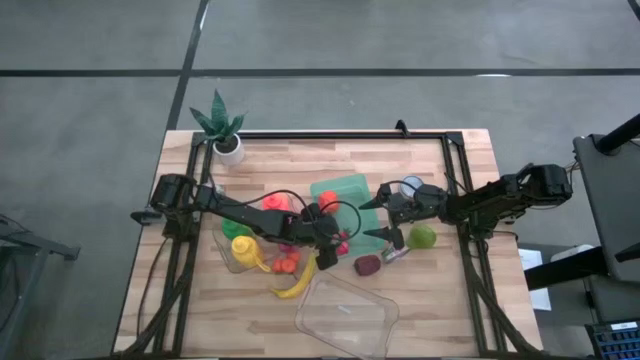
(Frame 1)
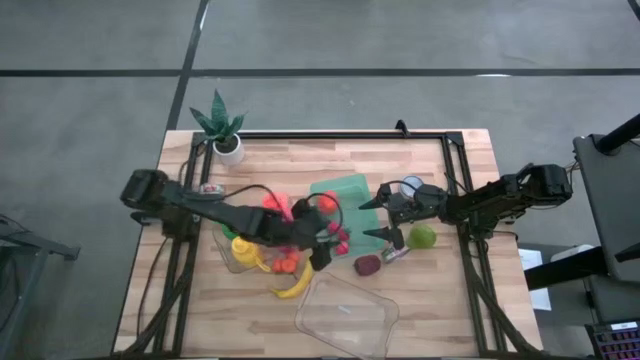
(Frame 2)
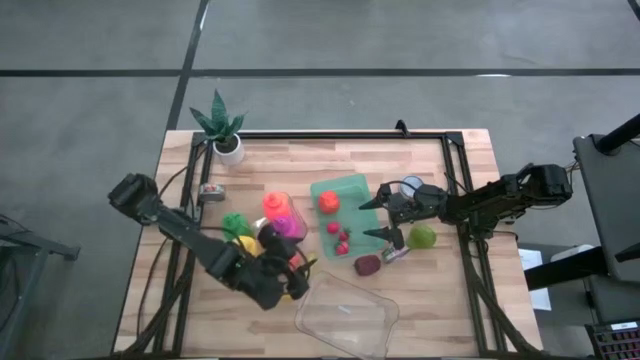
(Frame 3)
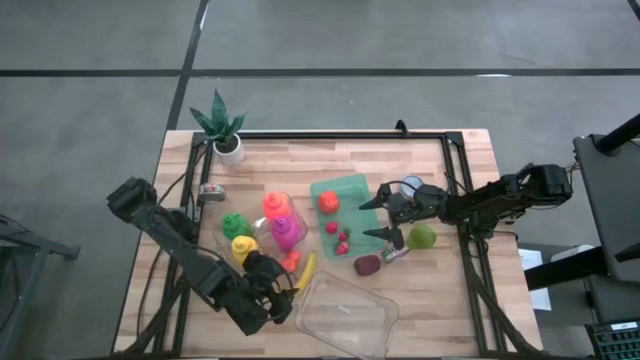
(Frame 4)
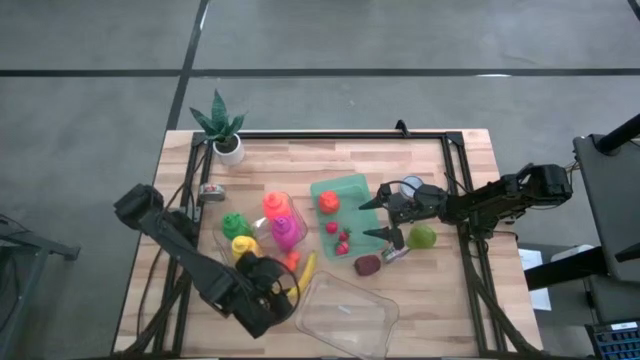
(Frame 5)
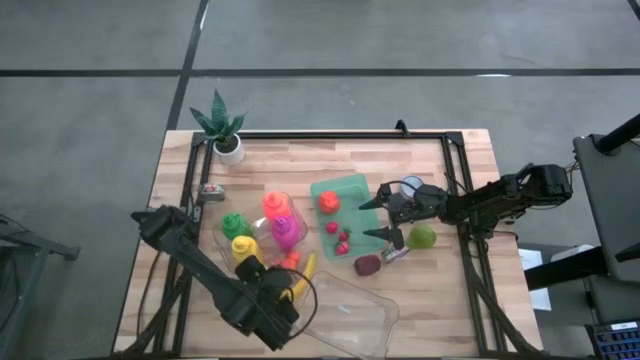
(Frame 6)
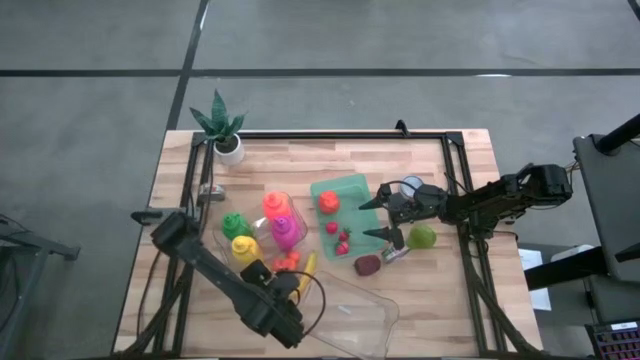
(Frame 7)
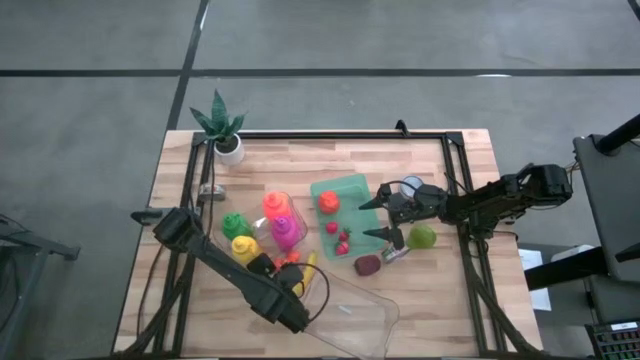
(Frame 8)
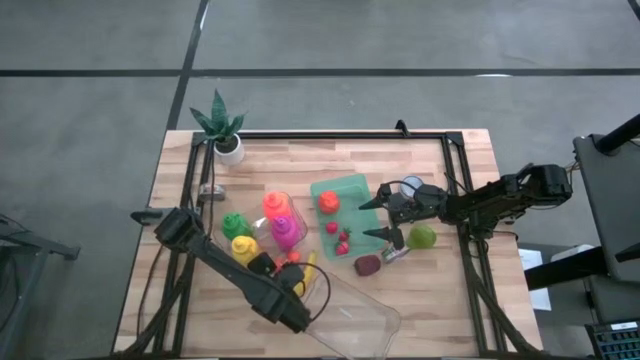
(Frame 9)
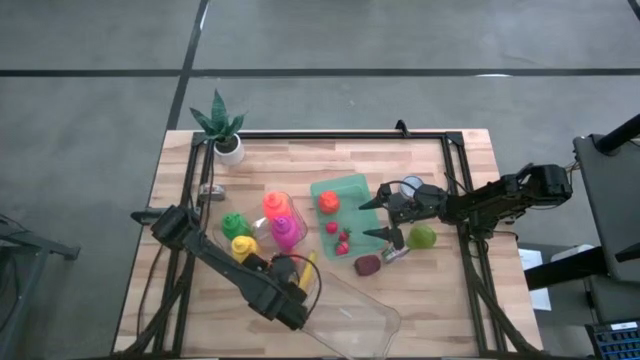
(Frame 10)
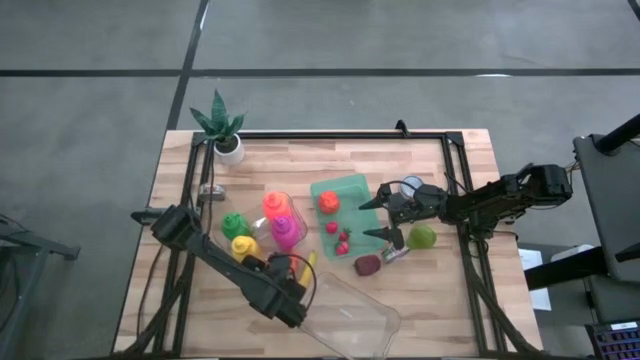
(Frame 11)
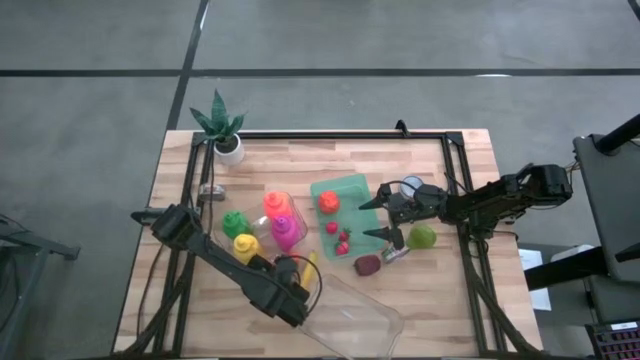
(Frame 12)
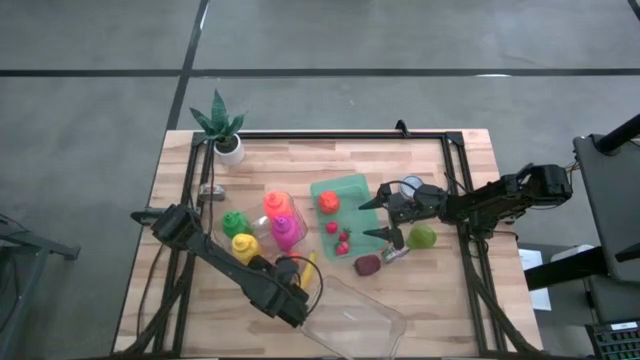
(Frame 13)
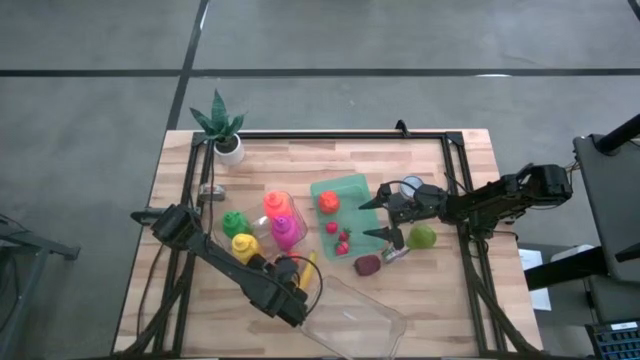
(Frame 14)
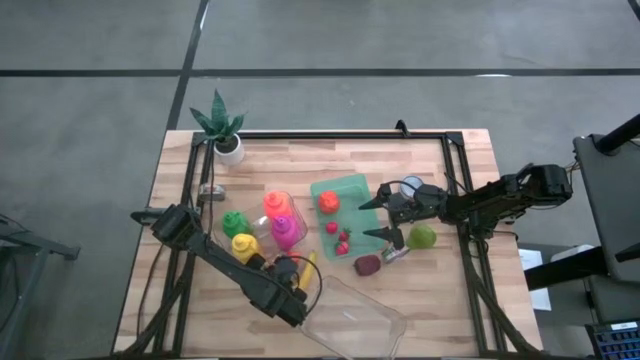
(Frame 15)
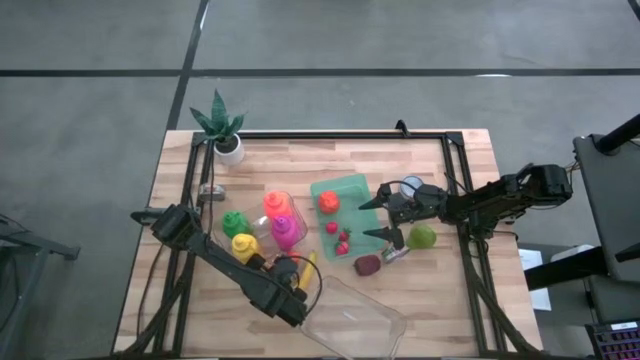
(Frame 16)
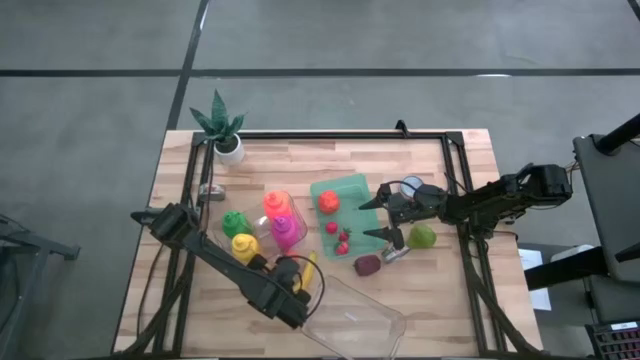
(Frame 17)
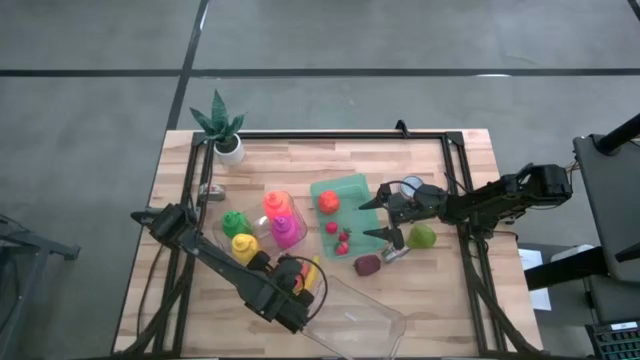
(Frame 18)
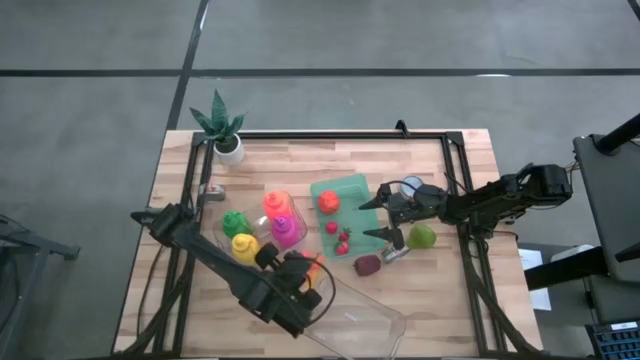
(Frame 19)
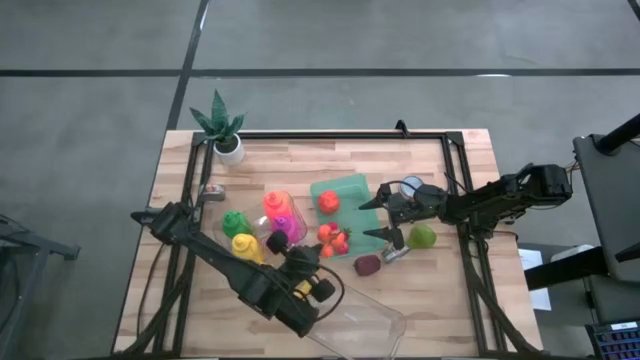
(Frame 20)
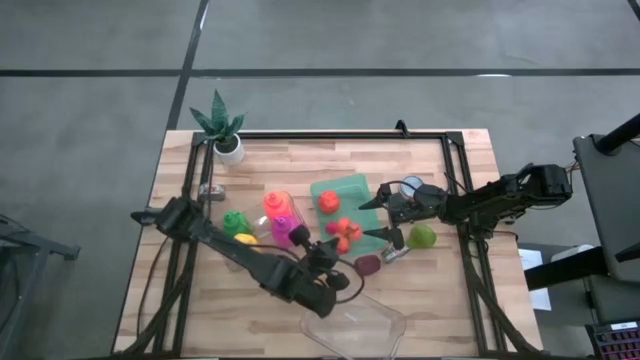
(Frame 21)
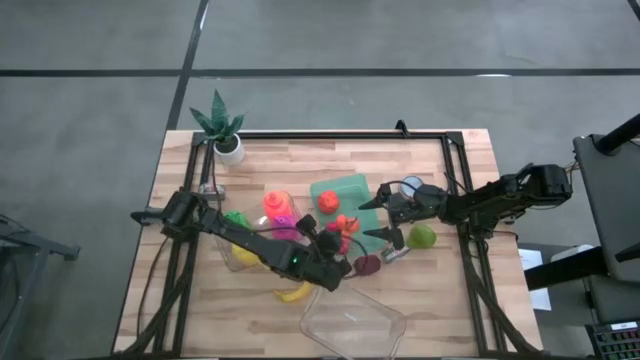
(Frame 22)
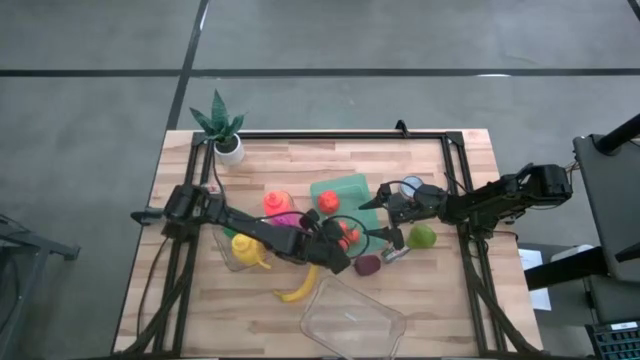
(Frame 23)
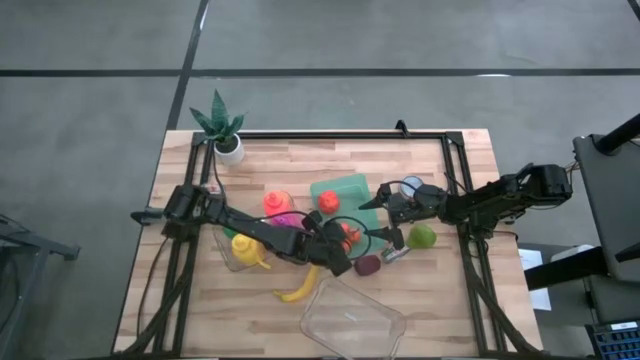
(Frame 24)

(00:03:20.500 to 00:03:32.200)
Task: Pick & Place Food Item
Put the oranges into the green bin

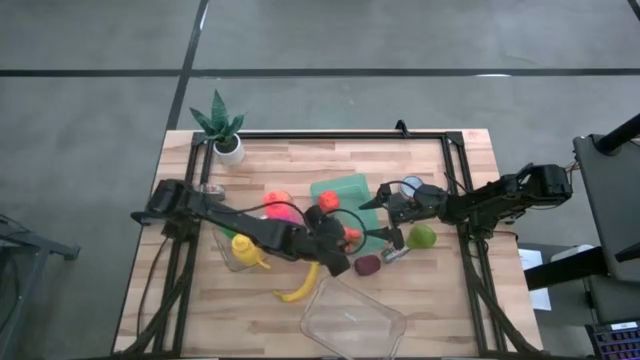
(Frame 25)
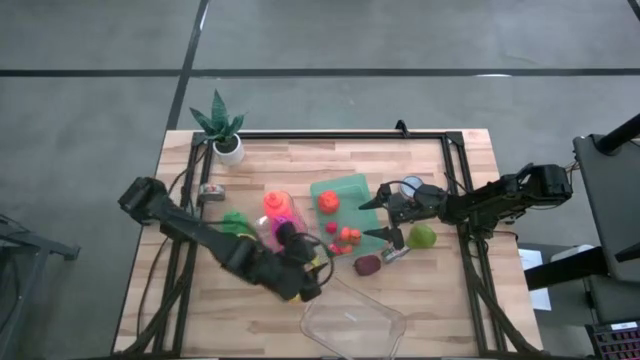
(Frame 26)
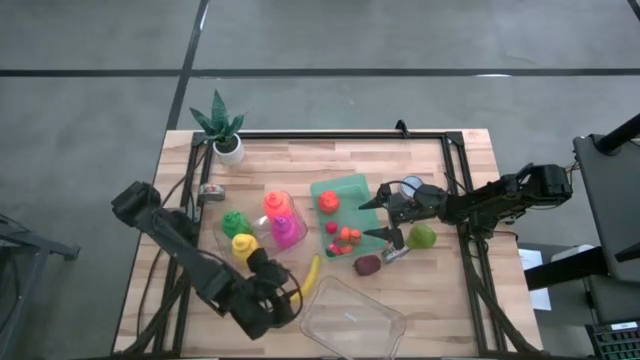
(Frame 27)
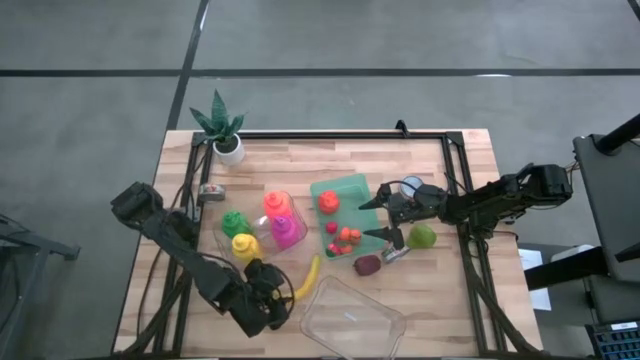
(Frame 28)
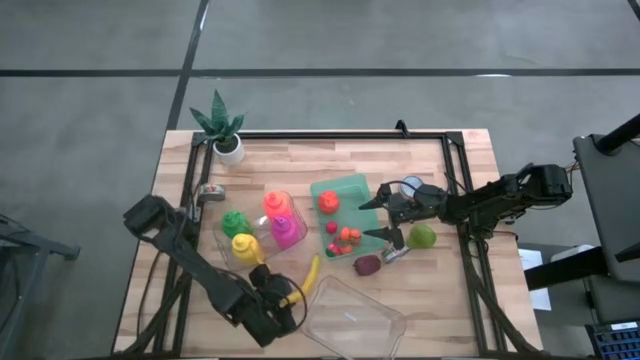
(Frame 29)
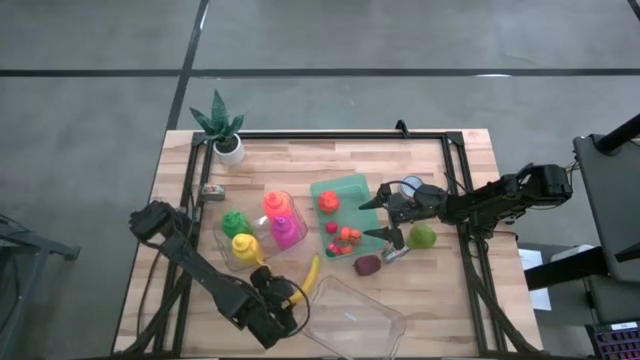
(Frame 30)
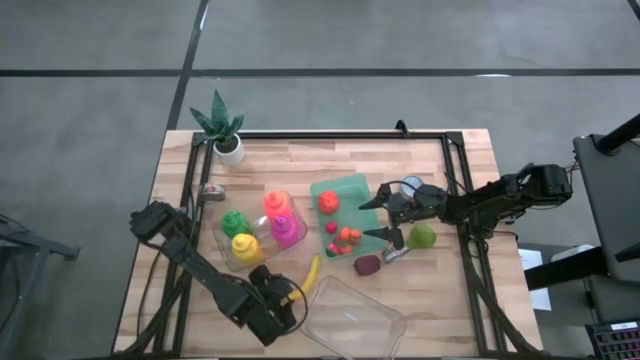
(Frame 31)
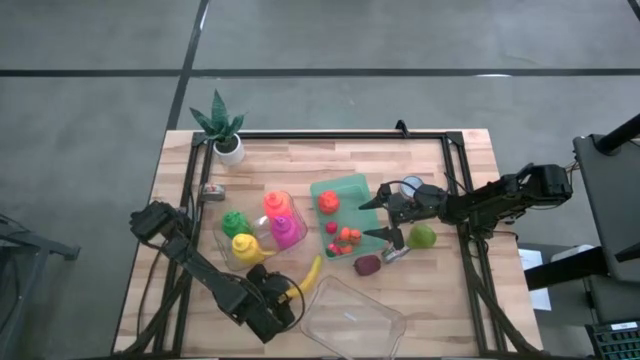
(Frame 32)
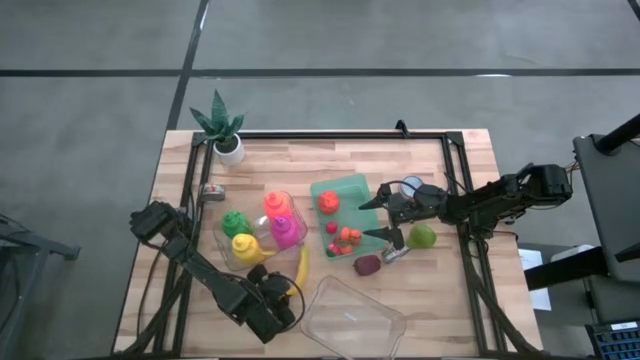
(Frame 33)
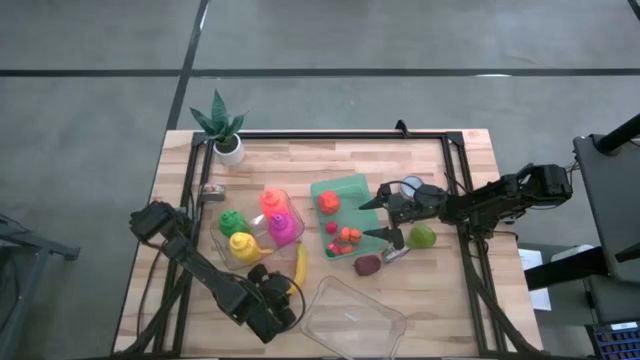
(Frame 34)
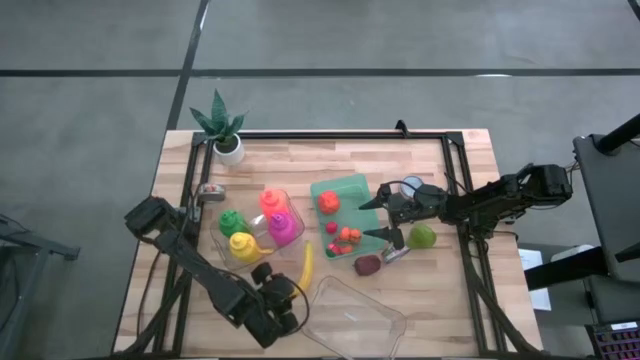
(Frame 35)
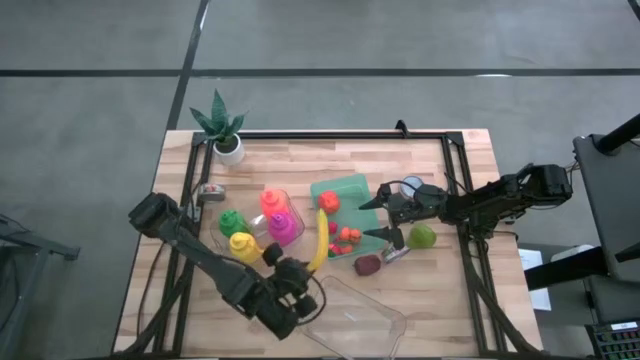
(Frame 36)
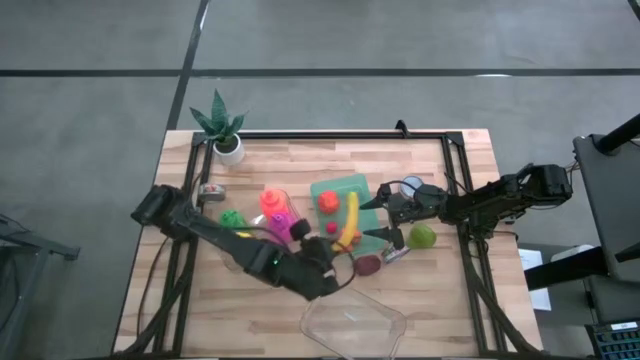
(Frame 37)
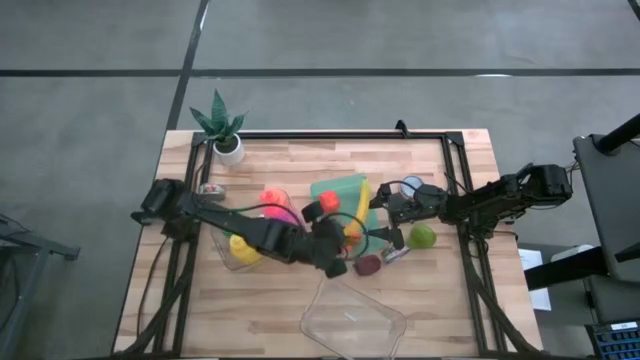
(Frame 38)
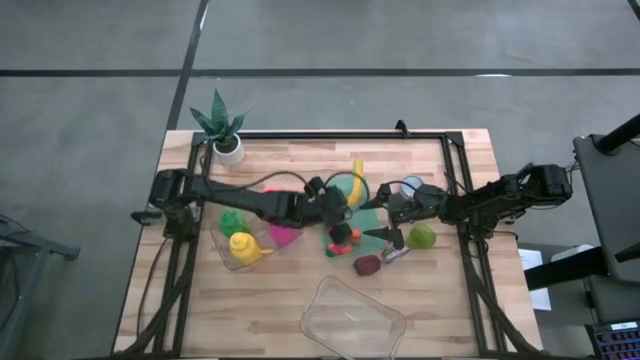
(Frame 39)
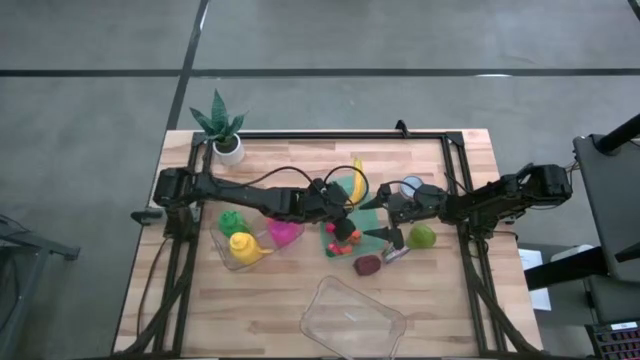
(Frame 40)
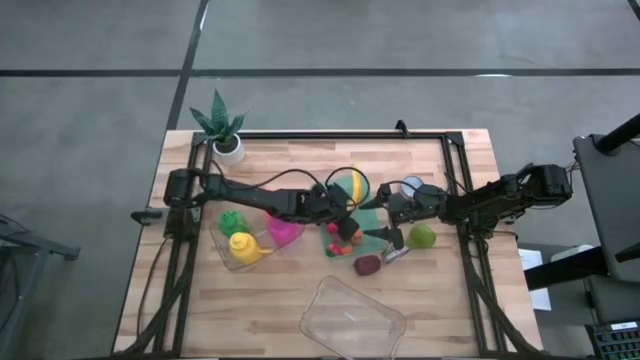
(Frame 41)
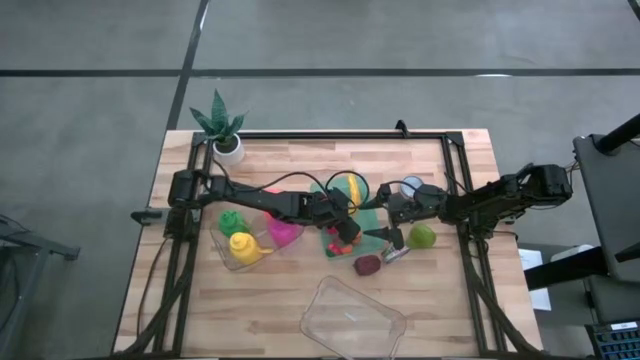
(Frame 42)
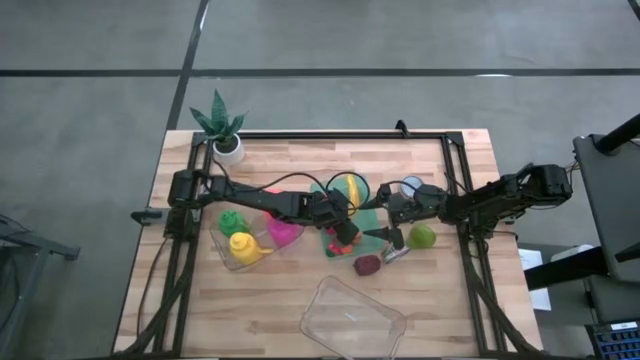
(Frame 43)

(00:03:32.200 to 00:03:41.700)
Put the yellow banana into the green bin

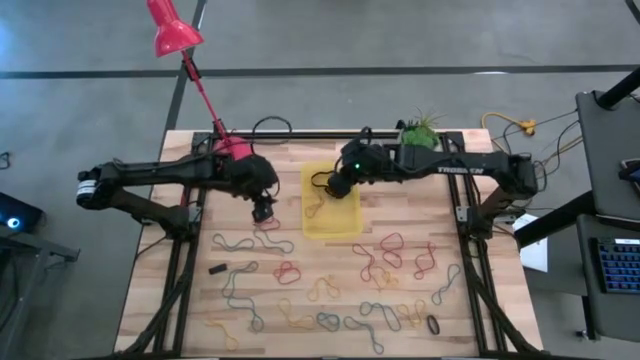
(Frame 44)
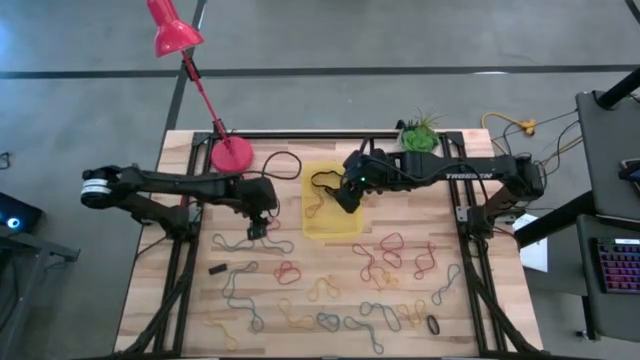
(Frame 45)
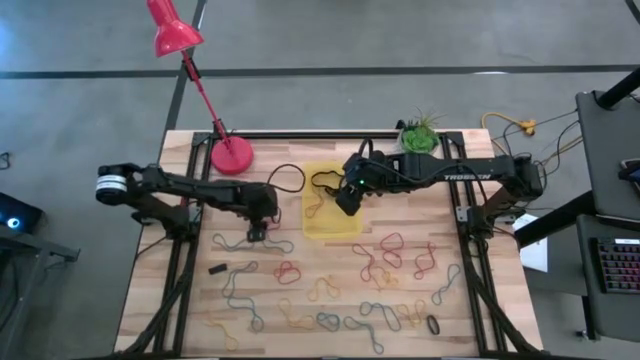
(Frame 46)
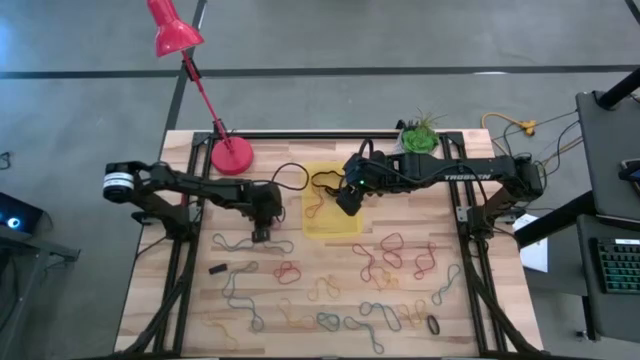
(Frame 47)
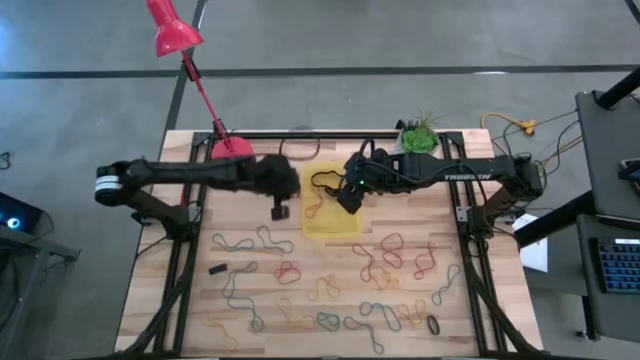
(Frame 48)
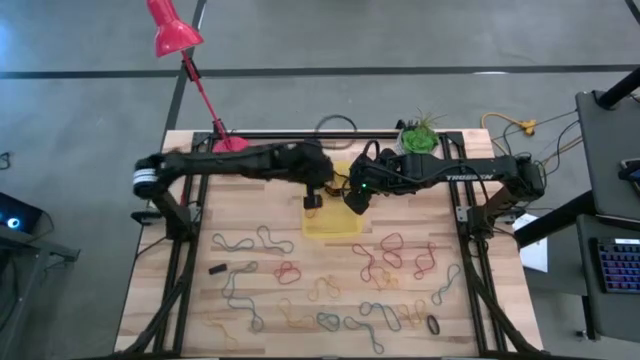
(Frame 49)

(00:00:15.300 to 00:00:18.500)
Task: Pick and place rubber bands into bin
Put the red rubber band into the yellow bin
